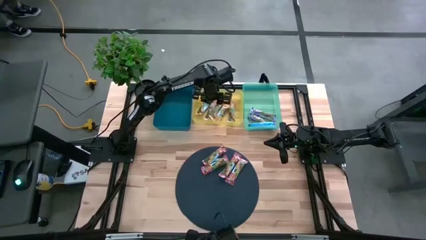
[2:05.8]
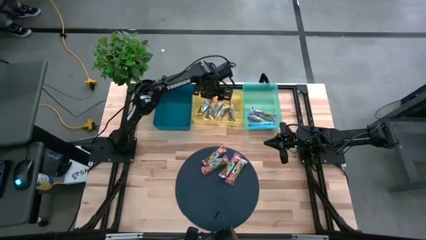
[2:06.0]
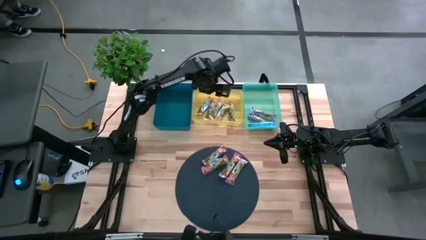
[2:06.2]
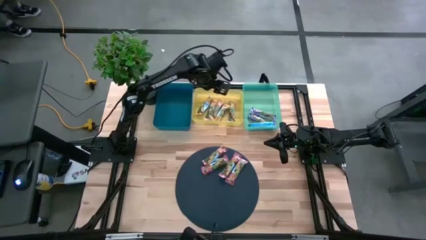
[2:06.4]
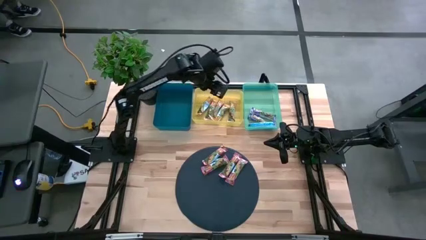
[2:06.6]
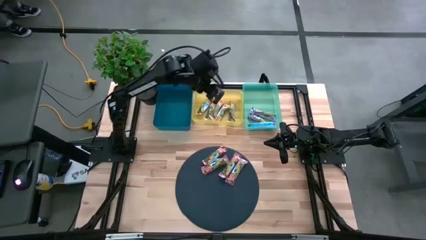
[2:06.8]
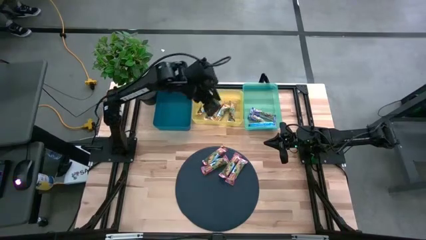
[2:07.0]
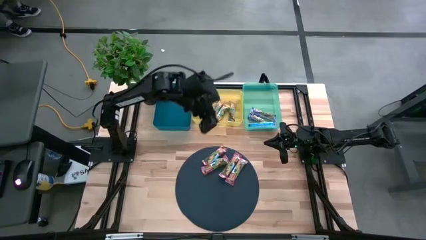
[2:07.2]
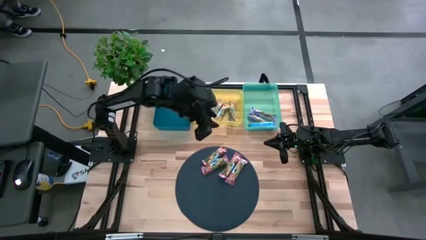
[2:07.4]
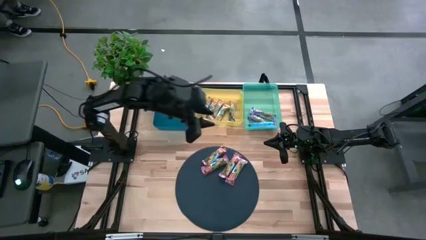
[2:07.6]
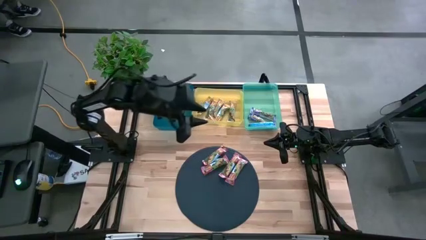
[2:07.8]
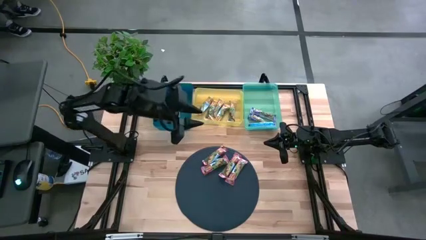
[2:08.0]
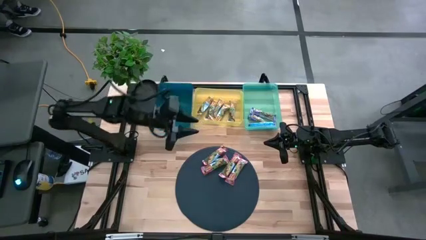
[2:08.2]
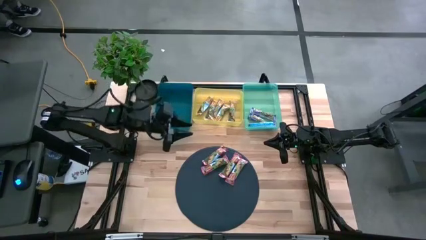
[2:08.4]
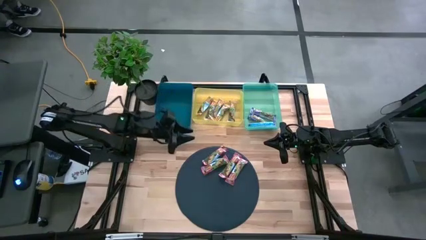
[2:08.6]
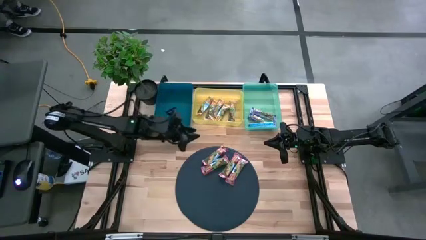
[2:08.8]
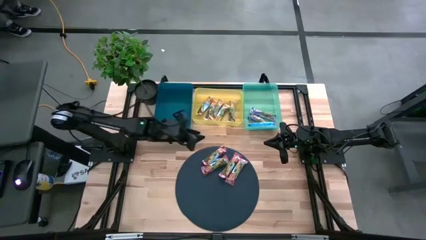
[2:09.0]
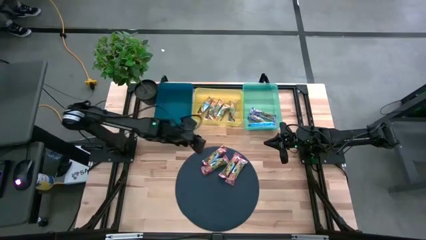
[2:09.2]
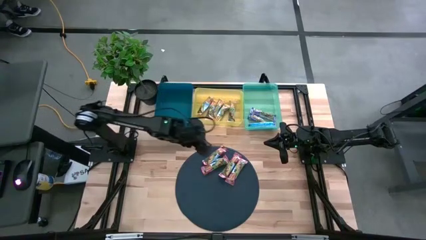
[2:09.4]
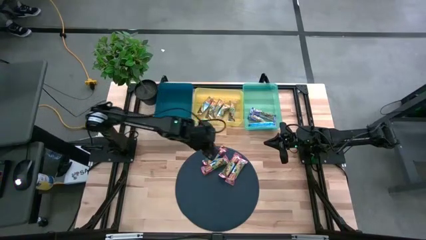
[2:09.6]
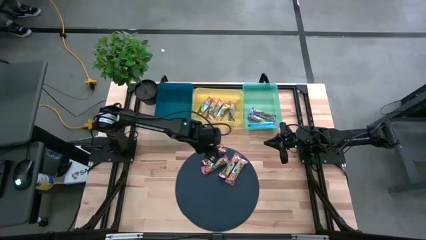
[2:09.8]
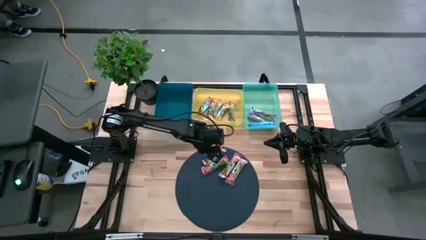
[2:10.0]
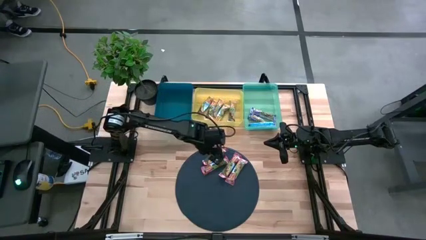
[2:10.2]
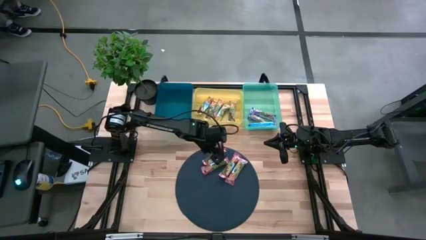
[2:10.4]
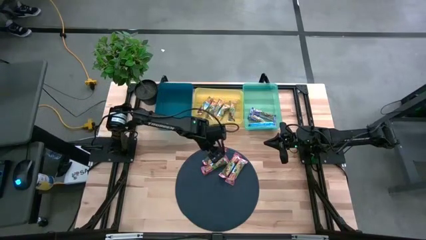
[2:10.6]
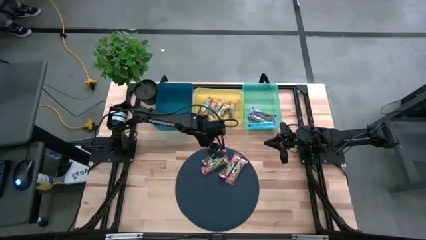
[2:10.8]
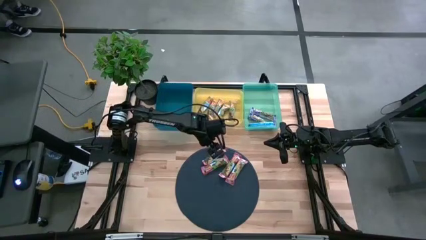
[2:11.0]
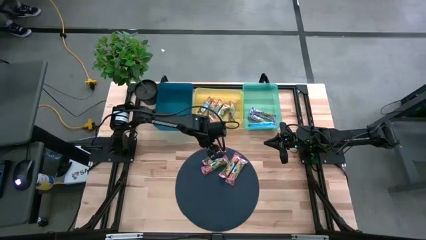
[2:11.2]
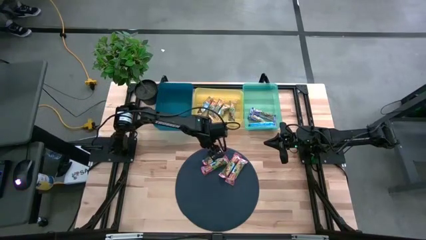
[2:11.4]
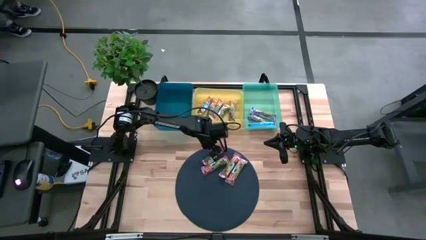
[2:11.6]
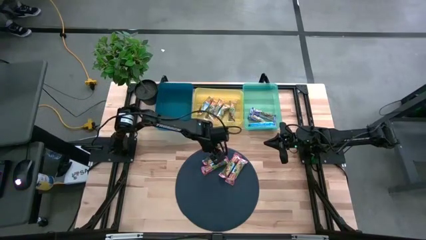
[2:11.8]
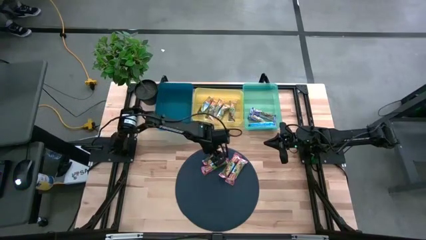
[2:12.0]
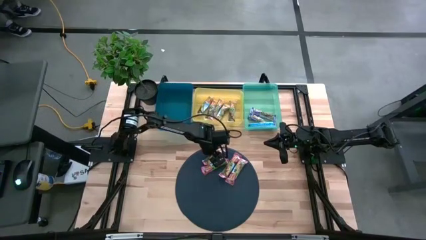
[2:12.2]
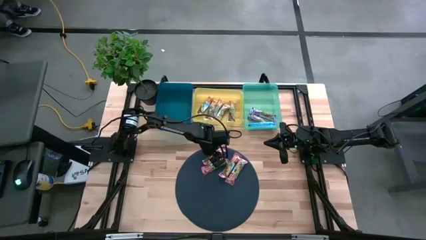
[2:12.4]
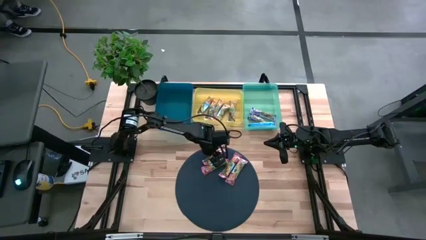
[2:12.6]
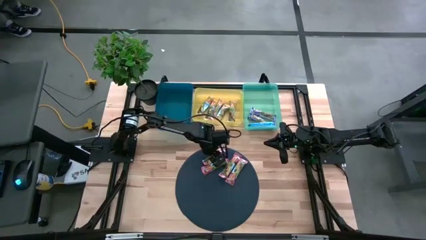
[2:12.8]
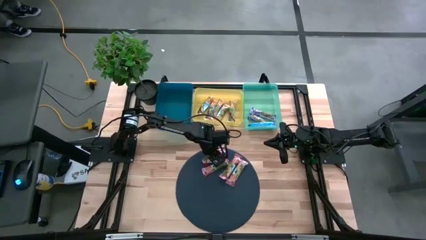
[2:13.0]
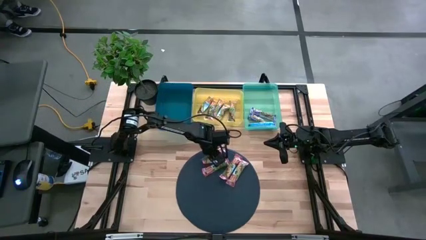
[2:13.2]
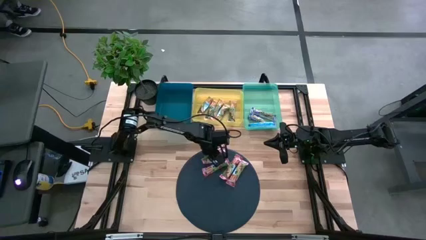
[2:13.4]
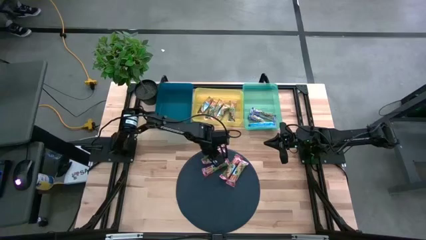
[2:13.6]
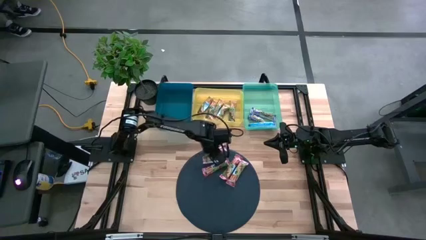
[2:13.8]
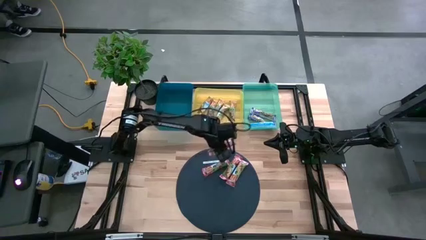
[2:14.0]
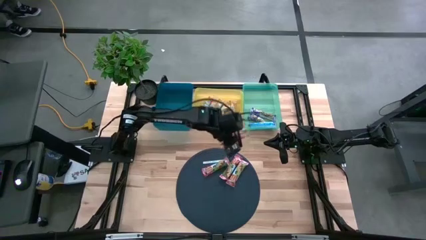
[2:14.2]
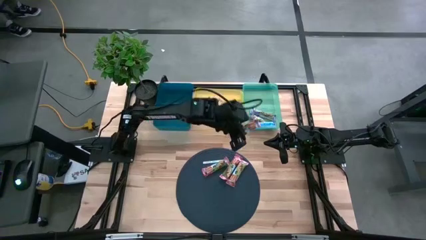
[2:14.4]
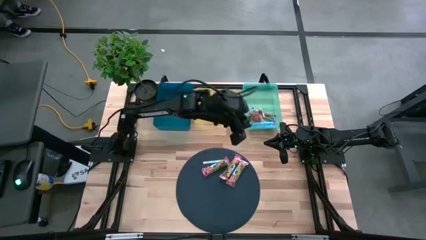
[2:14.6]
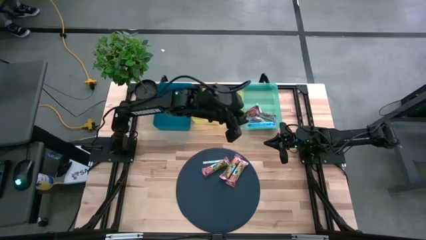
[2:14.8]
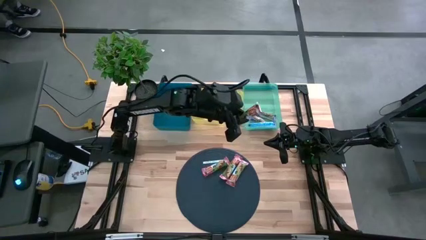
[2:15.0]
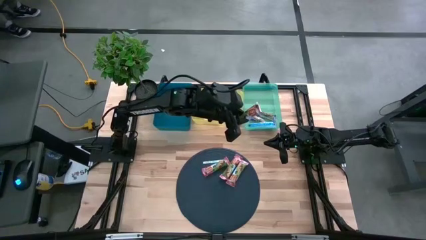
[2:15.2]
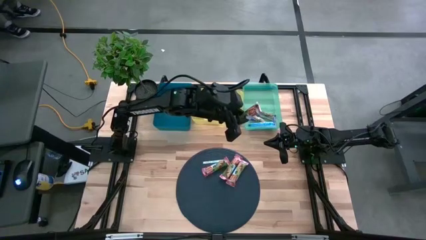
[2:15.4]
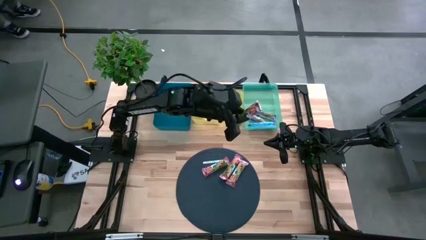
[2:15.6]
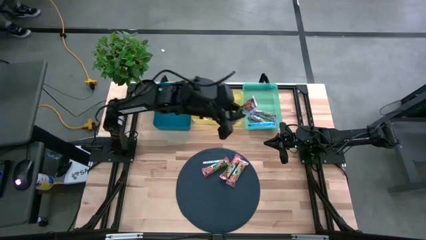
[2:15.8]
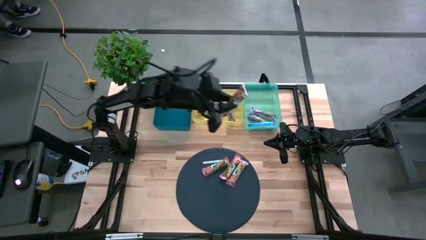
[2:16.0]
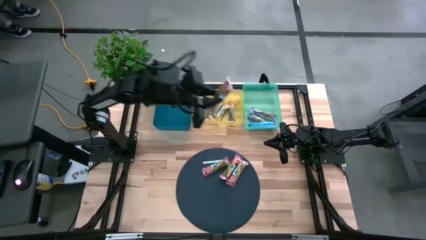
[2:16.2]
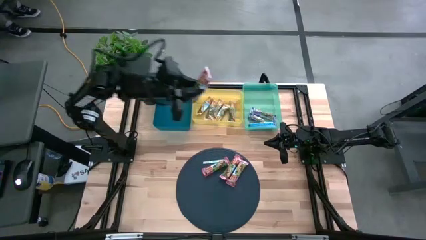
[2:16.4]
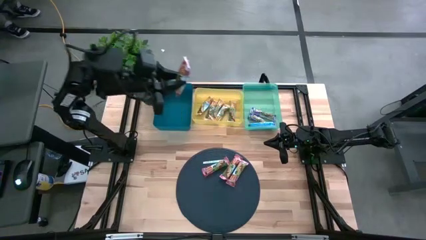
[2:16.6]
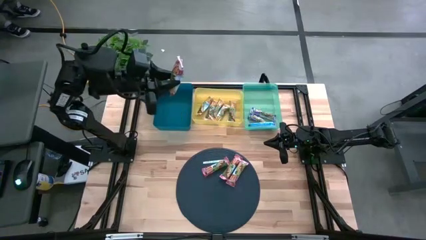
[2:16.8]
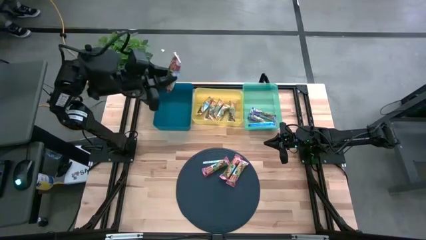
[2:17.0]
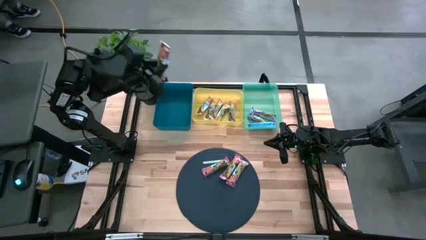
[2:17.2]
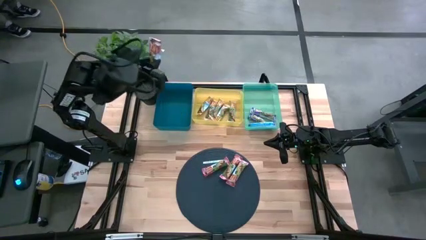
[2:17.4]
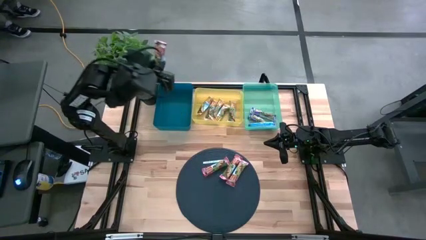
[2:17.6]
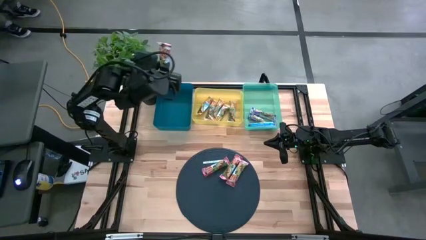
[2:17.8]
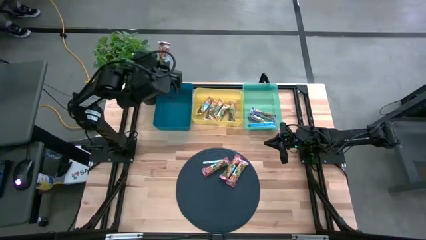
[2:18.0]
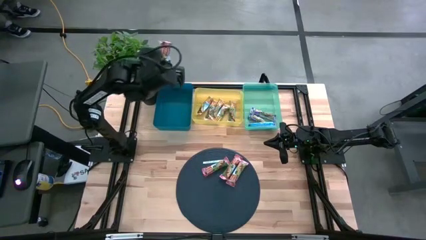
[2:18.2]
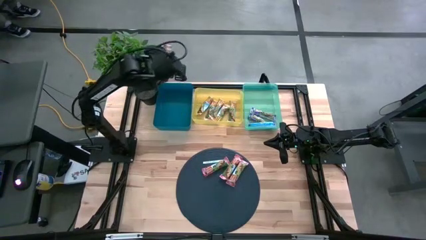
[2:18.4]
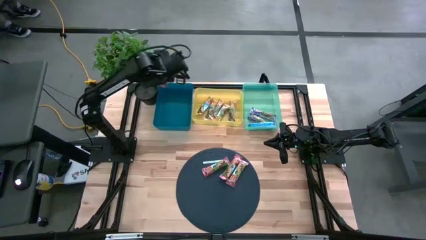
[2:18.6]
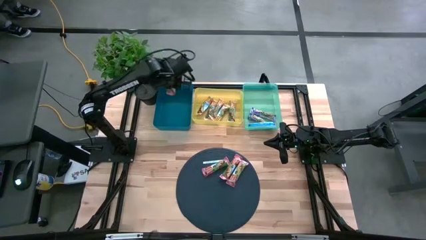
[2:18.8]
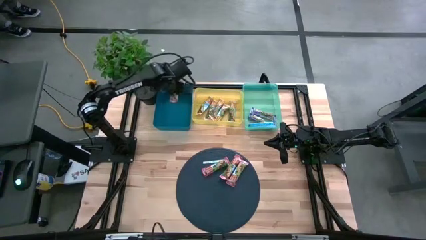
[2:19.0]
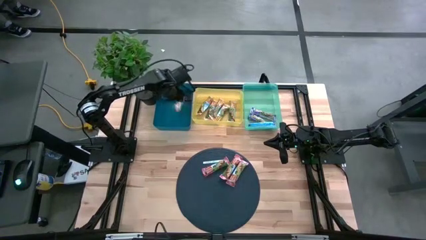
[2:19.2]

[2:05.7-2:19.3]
Task: Pick and place Granola Bars by type
Put the red granola bar into the blue bin

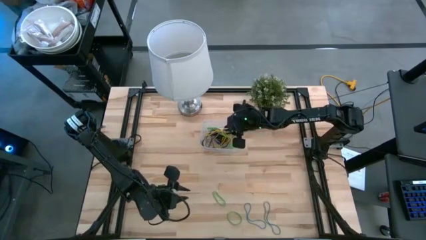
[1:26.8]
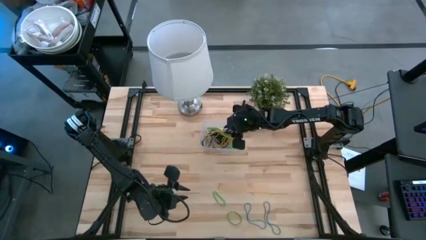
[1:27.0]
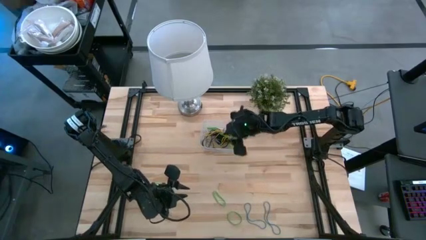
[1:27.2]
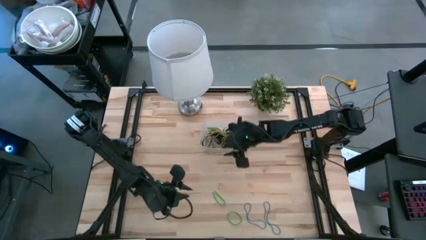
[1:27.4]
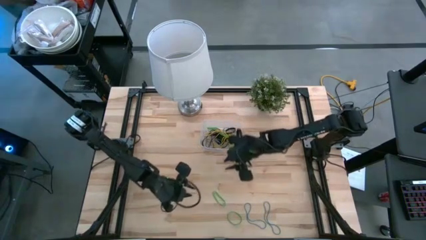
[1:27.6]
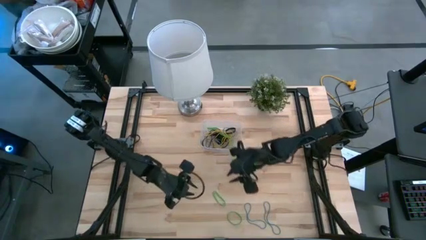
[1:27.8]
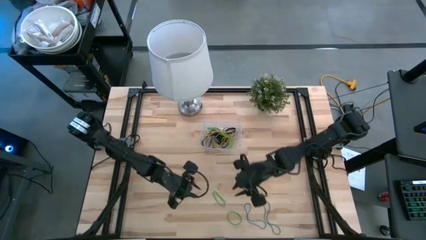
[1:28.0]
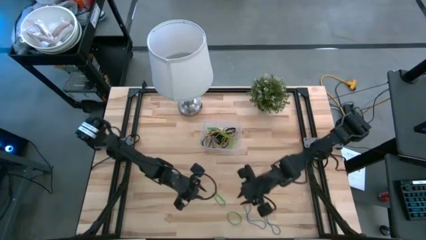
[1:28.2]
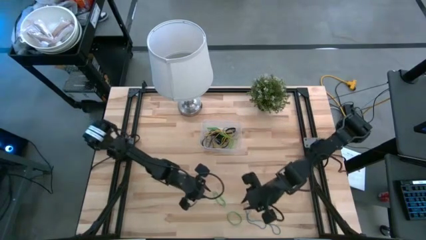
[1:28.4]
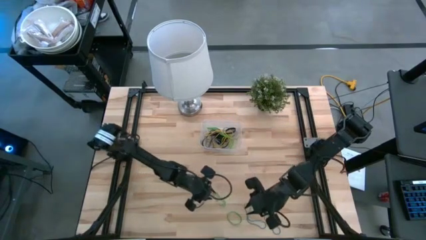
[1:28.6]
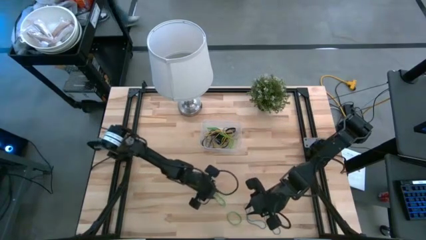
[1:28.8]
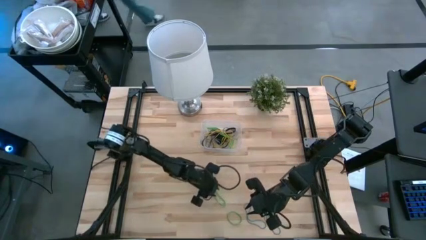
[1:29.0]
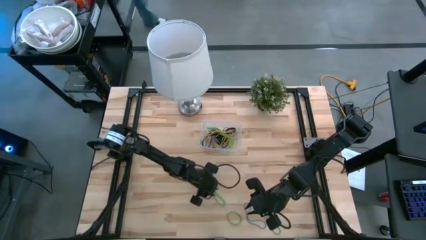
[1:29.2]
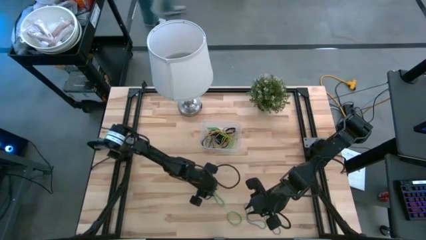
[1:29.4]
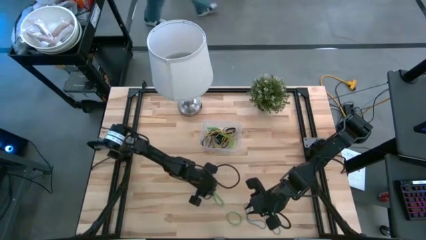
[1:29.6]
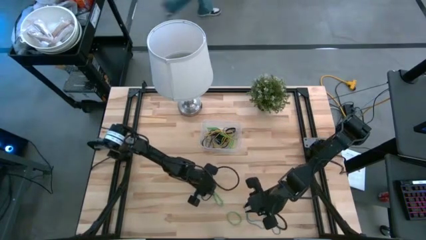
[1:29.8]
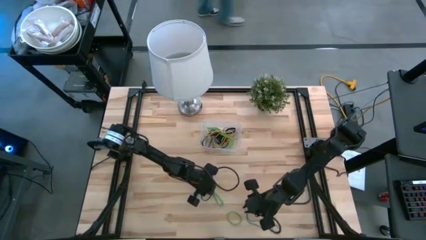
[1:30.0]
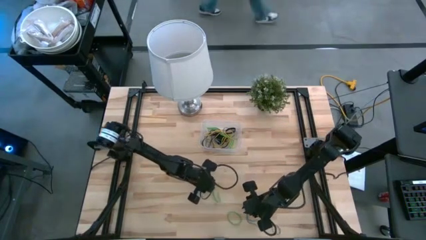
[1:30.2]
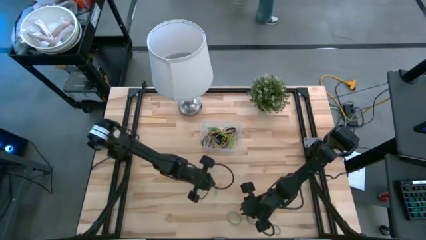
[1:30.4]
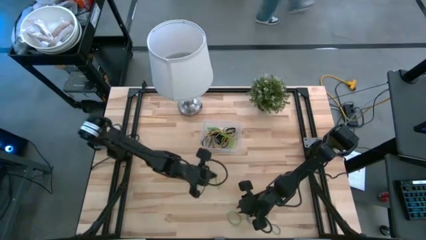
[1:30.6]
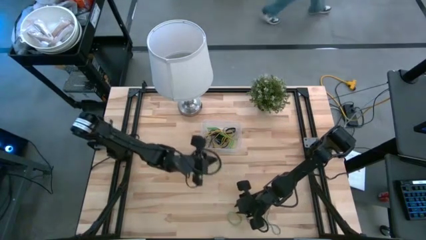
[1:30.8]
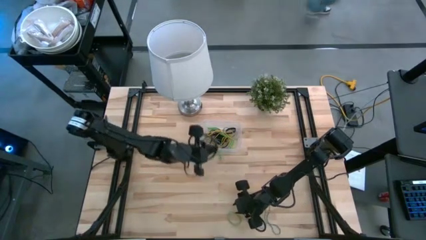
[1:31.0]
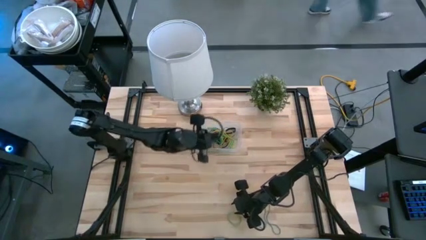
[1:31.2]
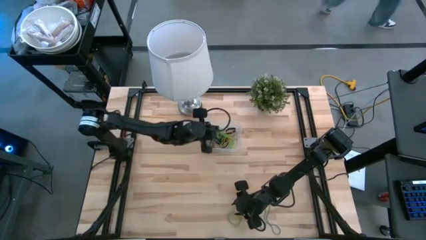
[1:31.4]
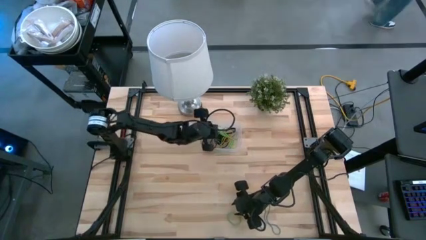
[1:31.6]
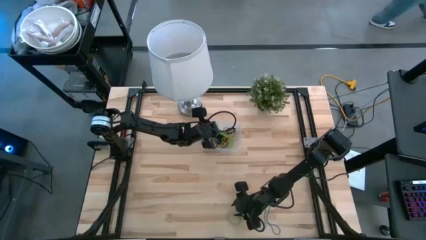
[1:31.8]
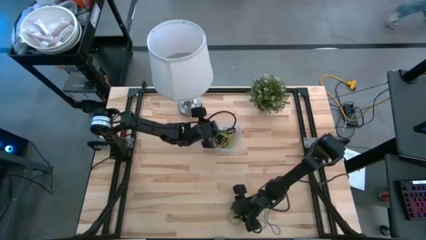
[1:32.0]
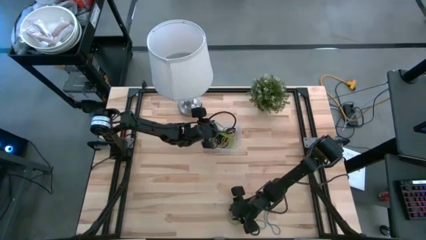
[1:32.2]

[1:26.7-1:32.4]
Task: Pick and place rubber bands into bin
Put the green rubber band into the transparent bin
